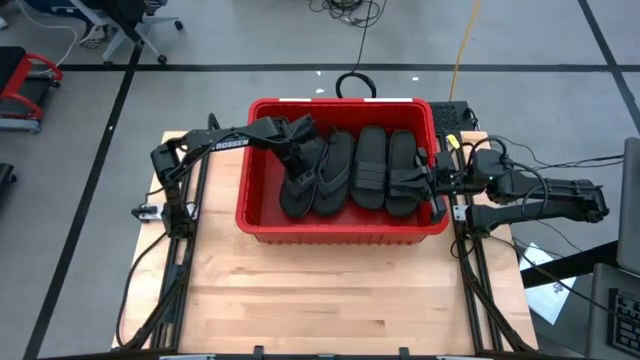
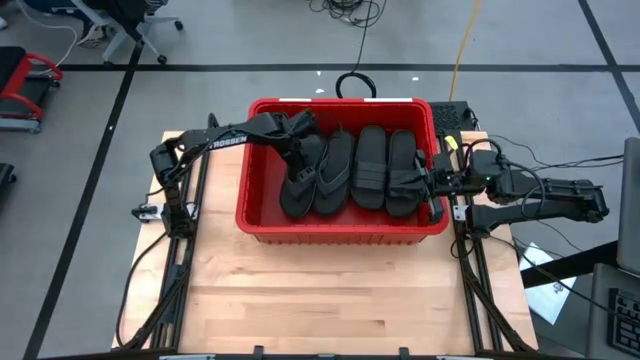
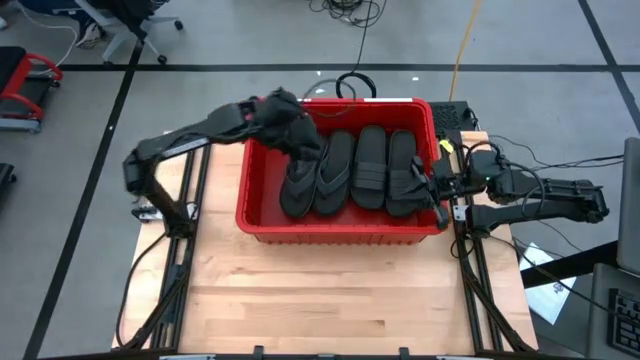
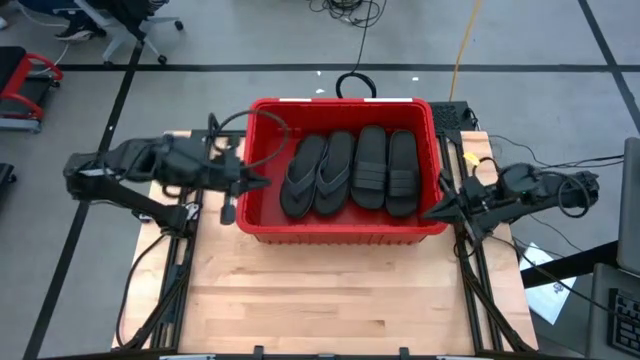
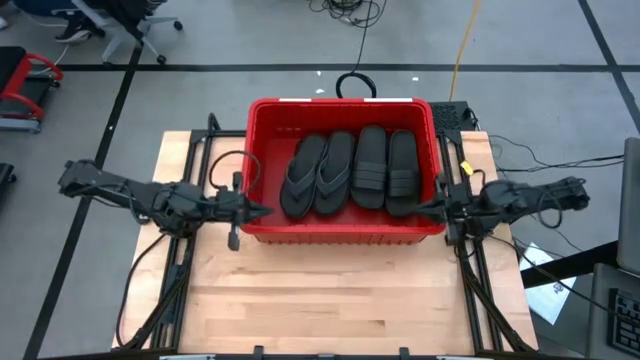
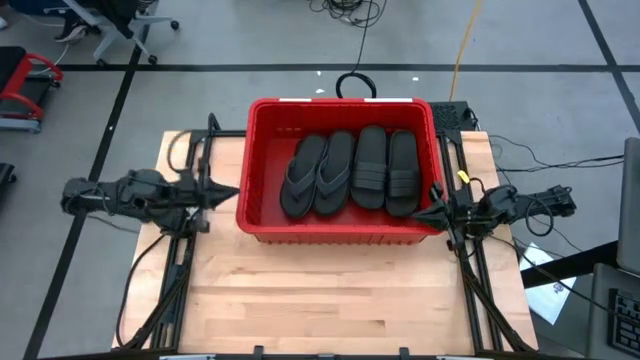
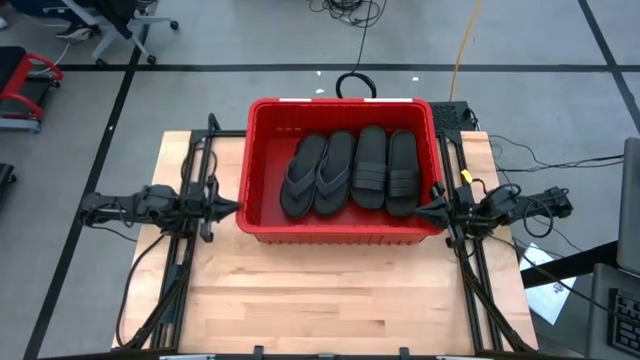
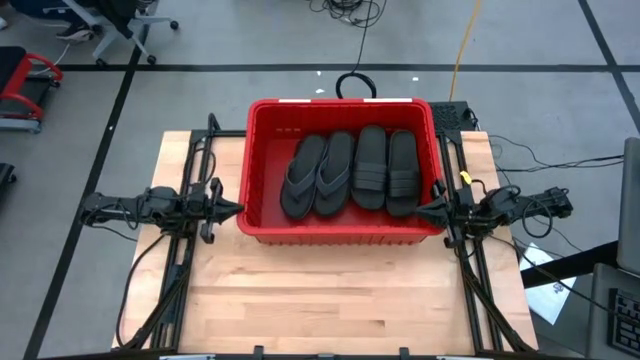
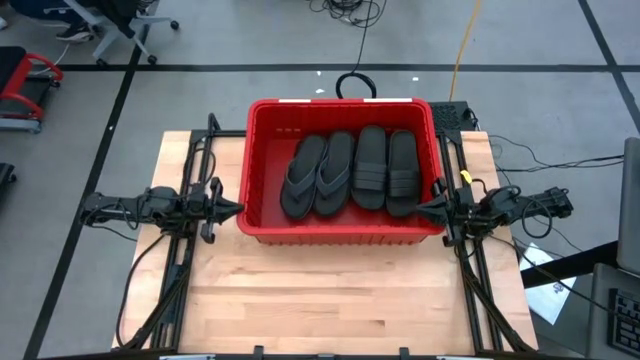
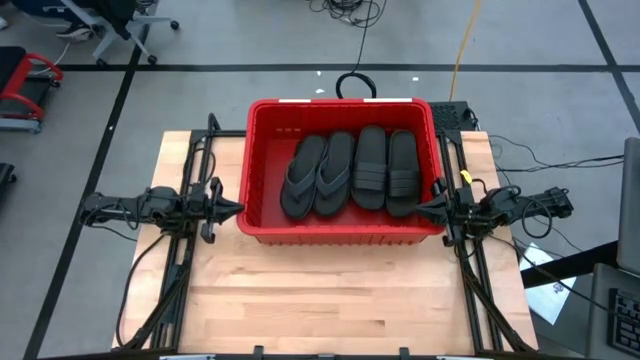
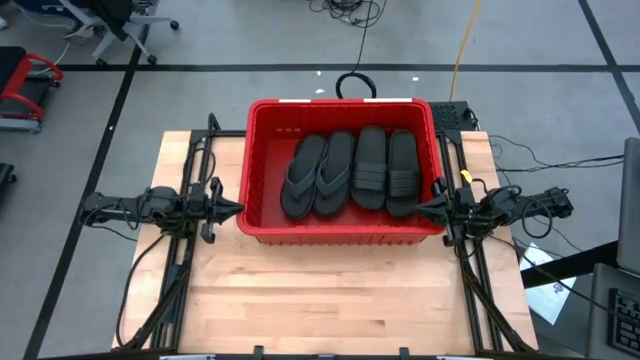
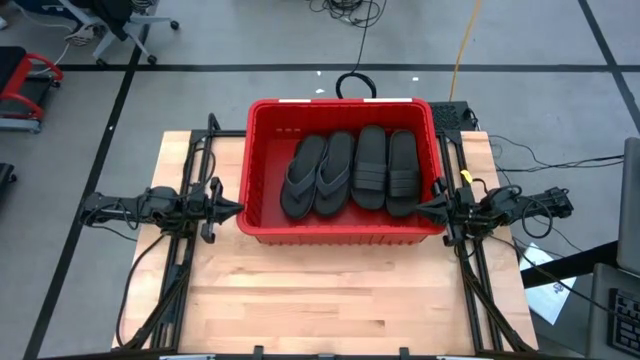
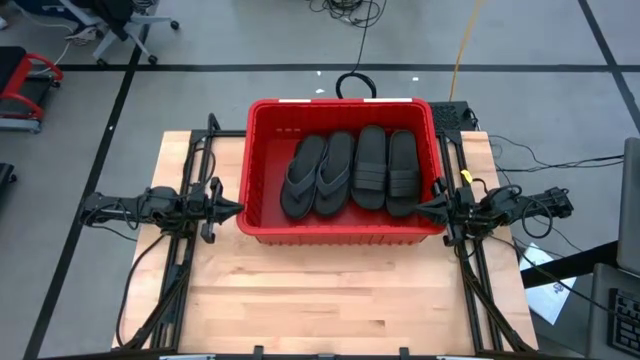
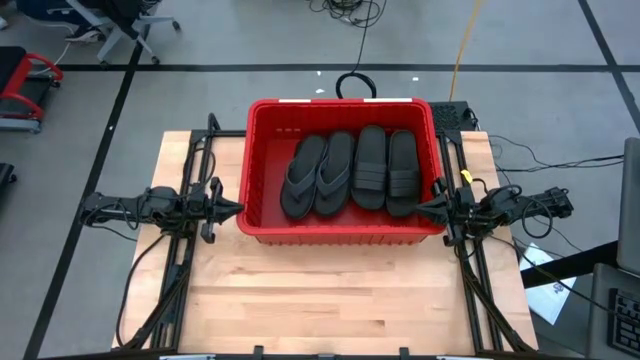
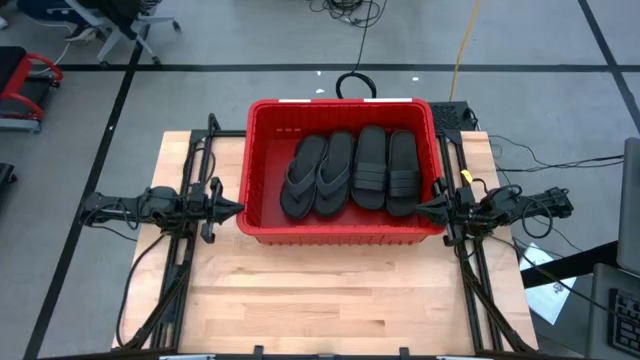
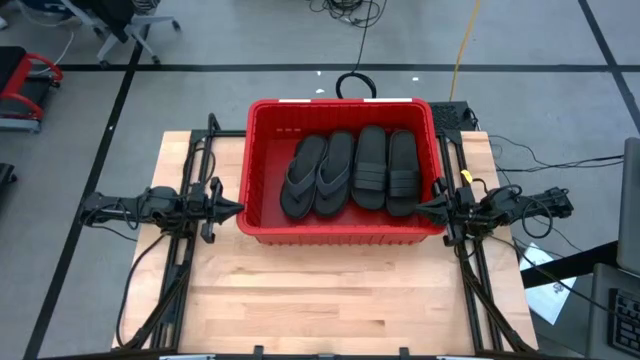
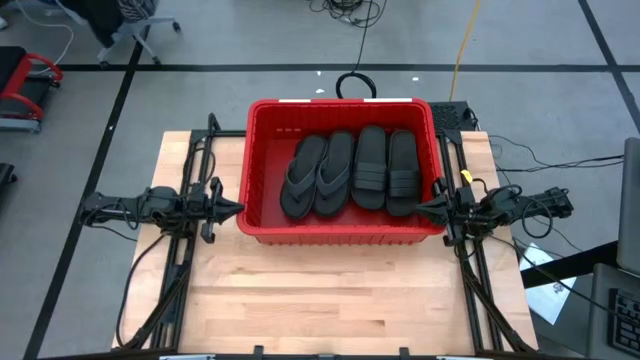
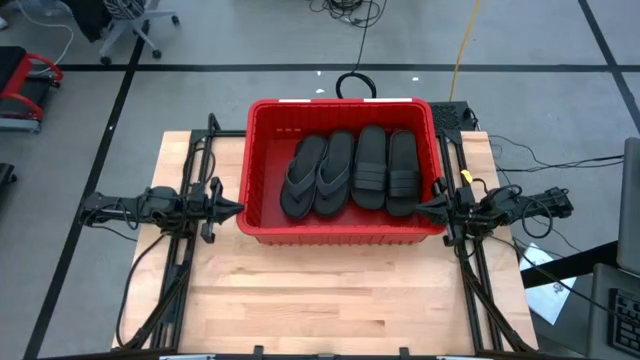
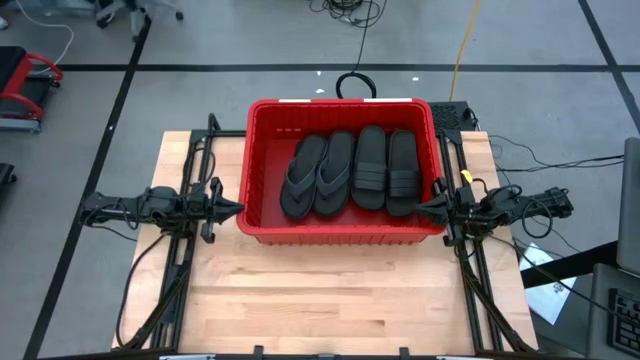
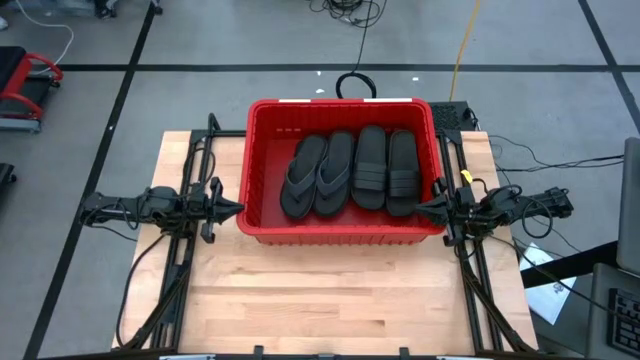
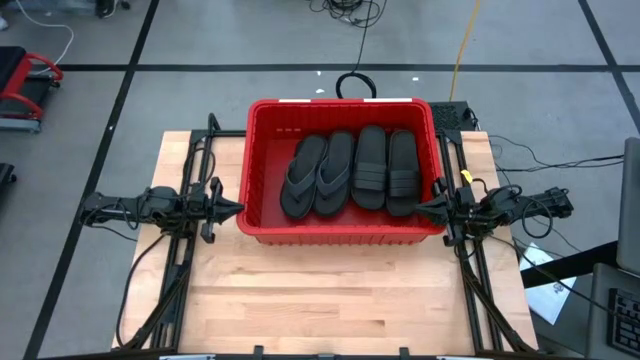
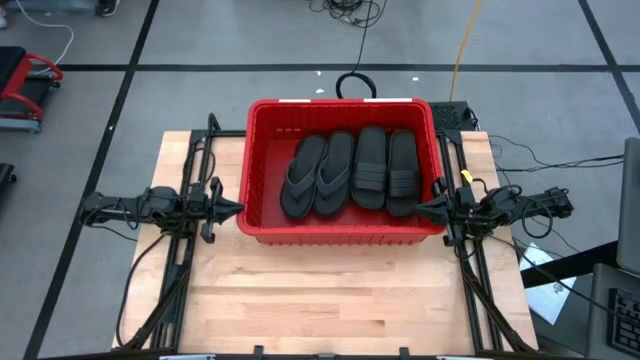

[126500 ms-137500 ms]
Task: Pick and place slides into bin
Return to Home Position

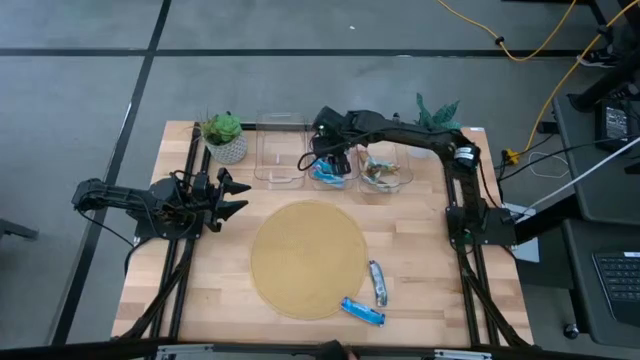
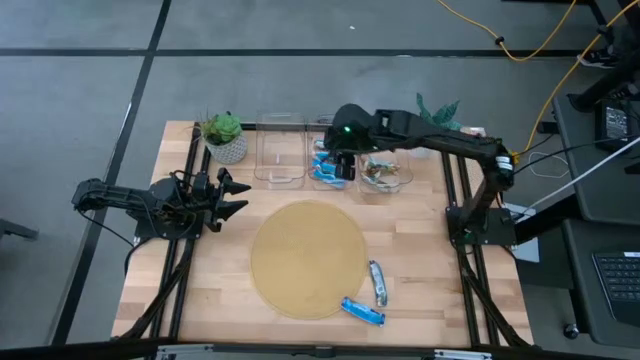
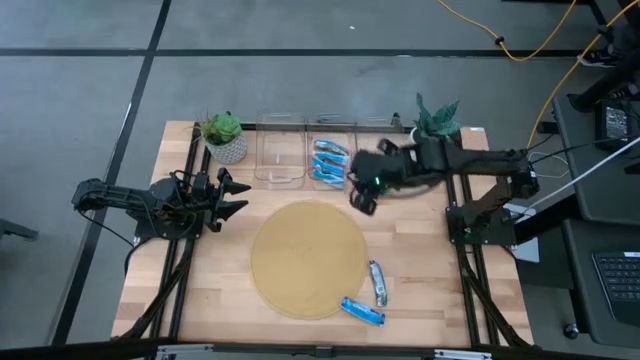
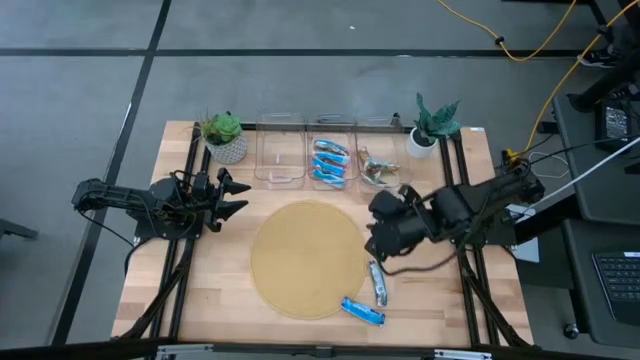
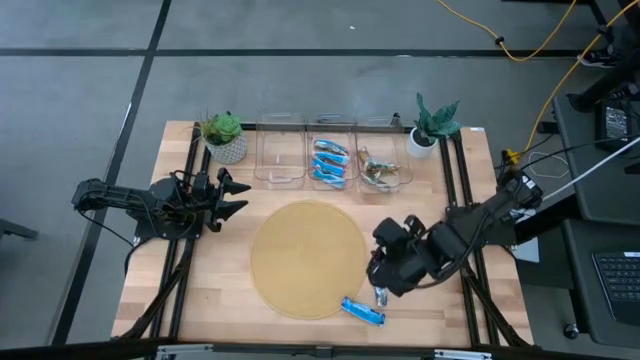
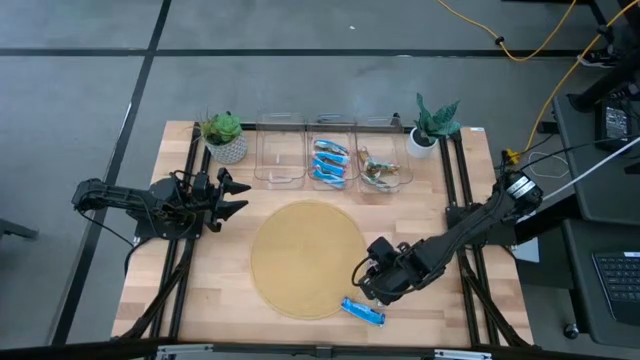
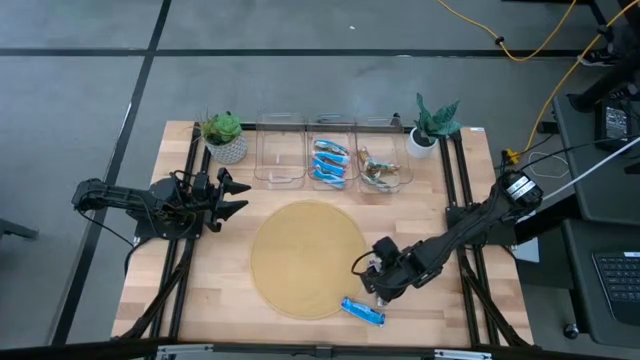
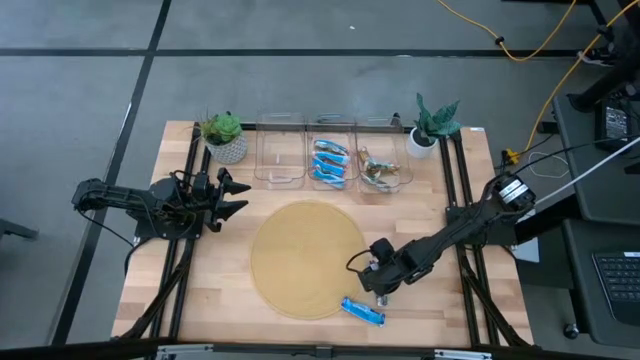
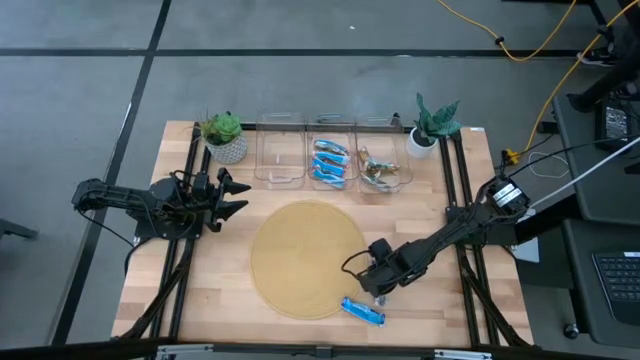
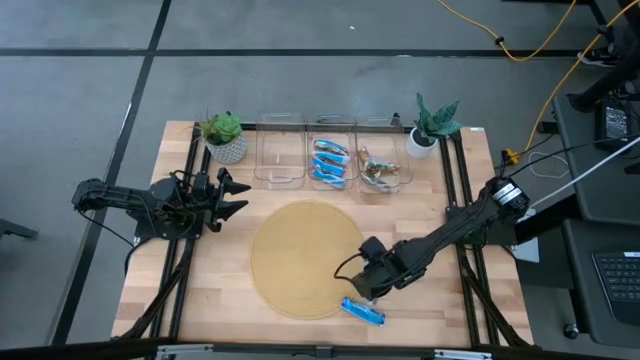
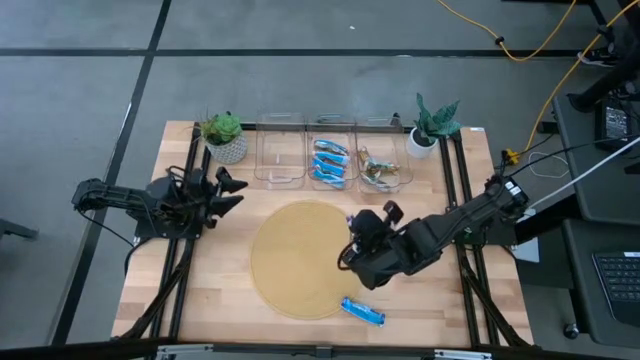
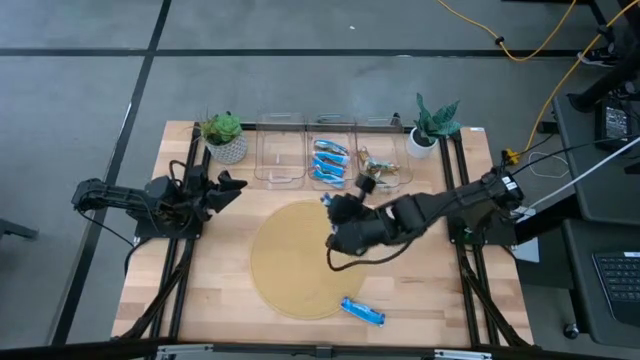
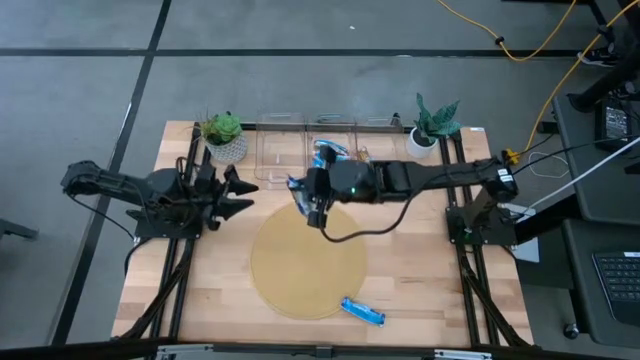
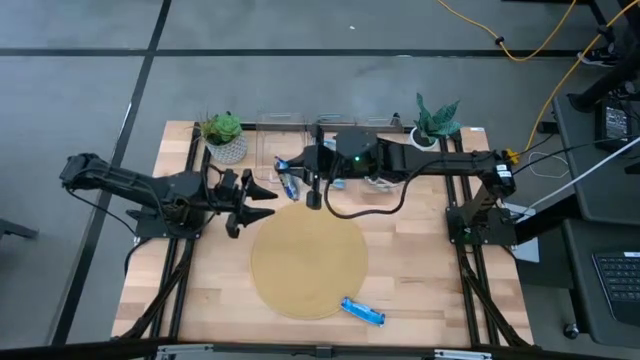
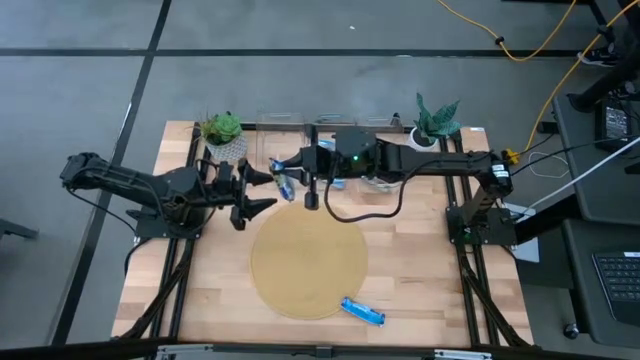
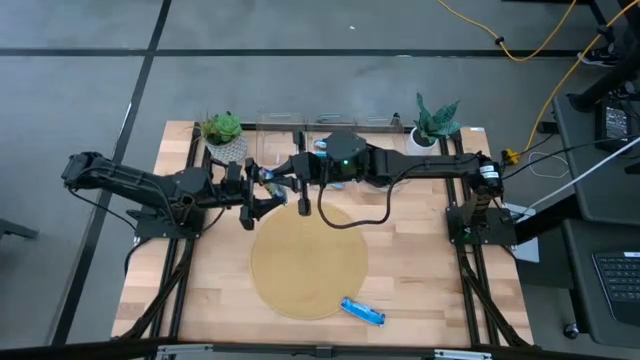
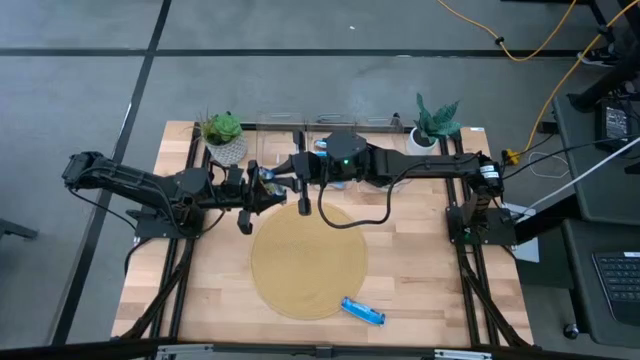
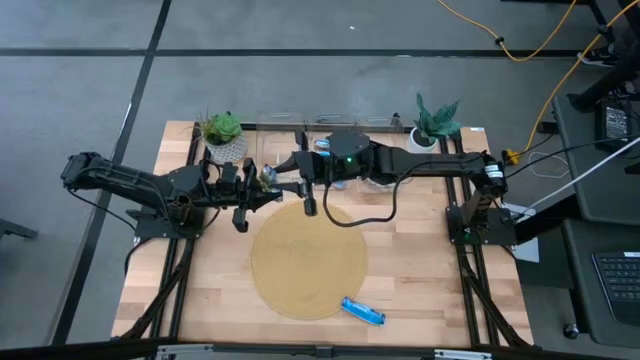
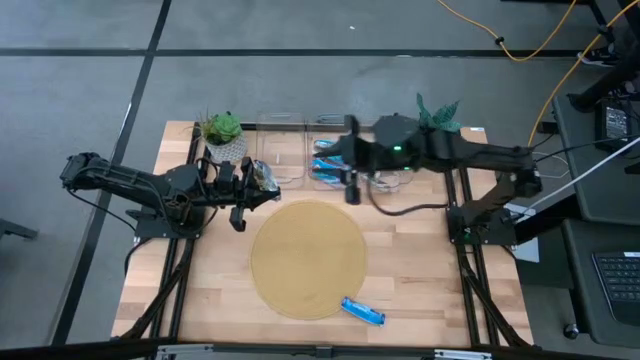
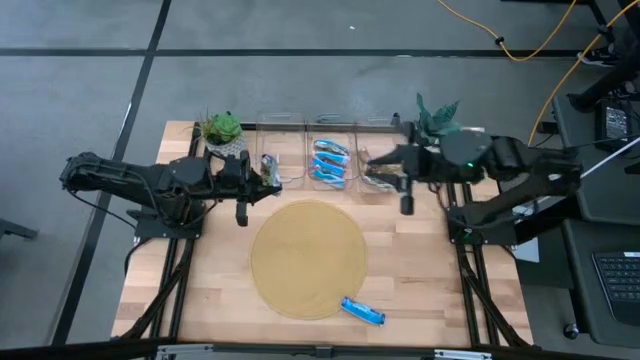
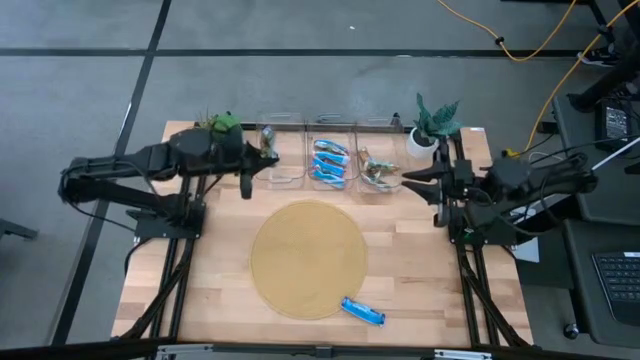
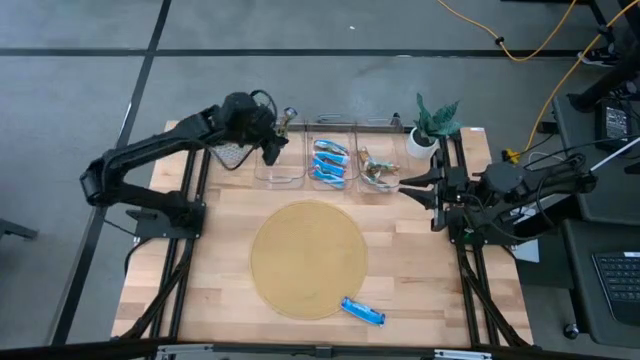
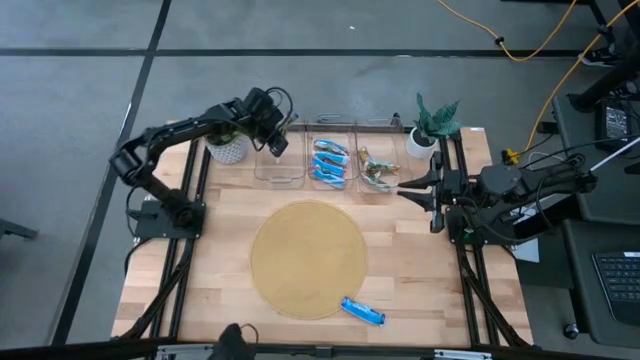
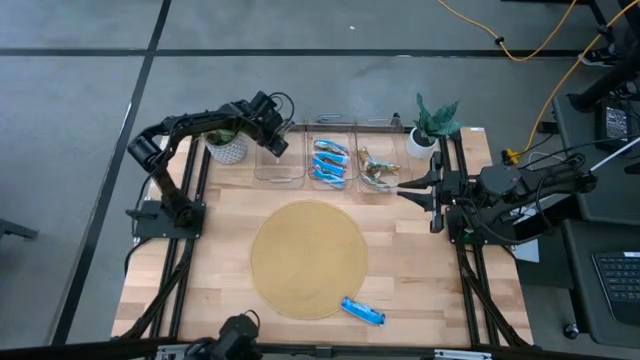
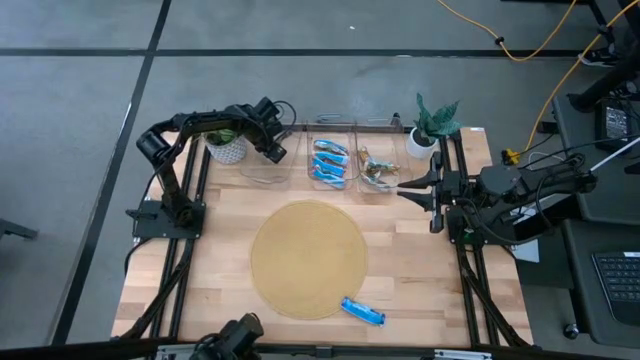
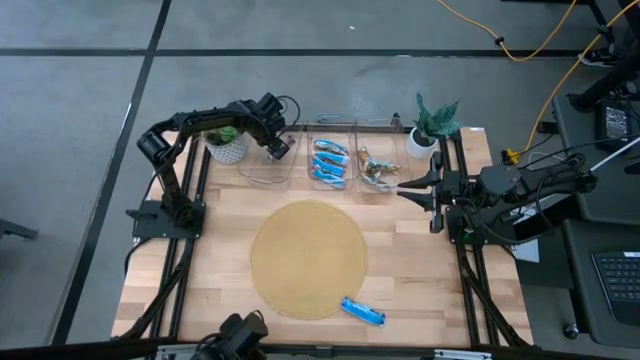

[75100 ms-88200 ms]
Task: Pick and place Granola Bars by type
Put the top blue granola bar into the left transparent bin
